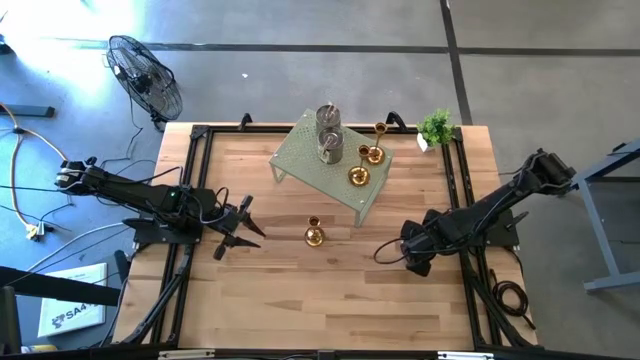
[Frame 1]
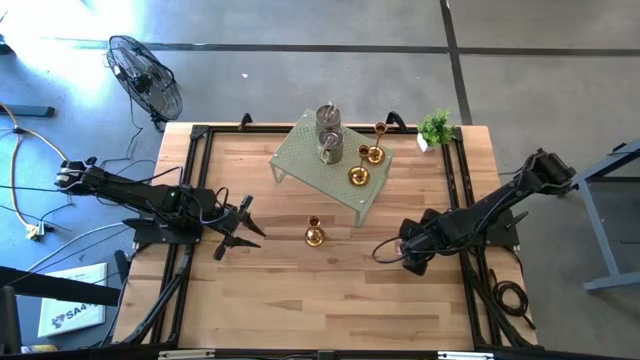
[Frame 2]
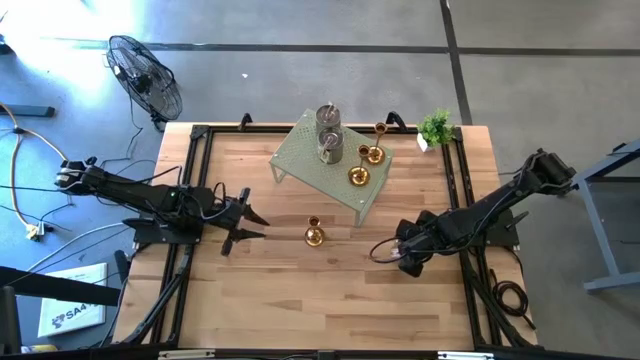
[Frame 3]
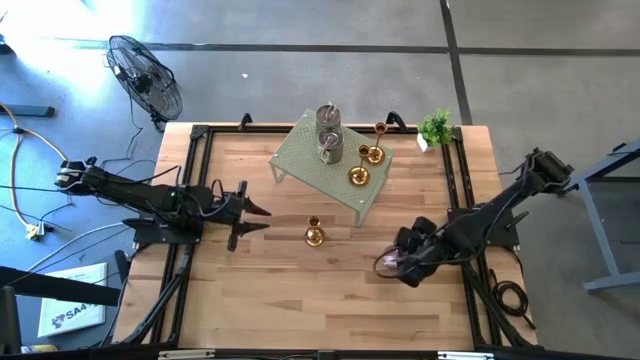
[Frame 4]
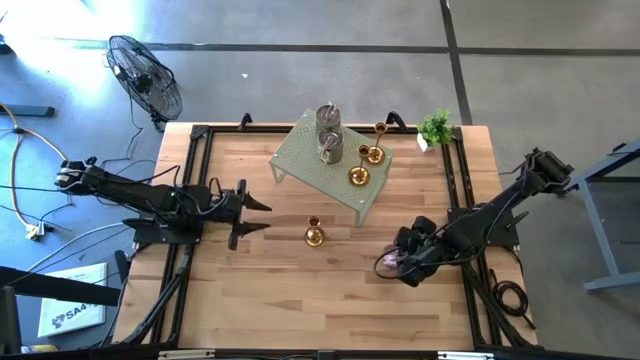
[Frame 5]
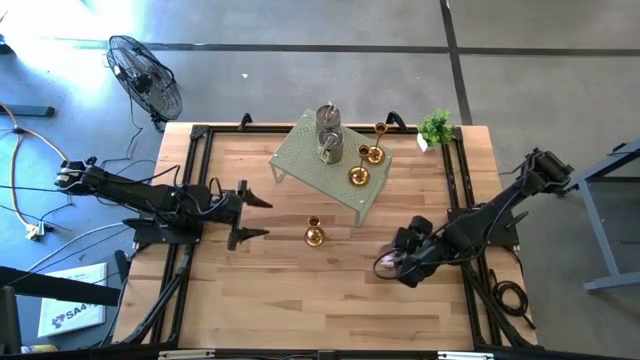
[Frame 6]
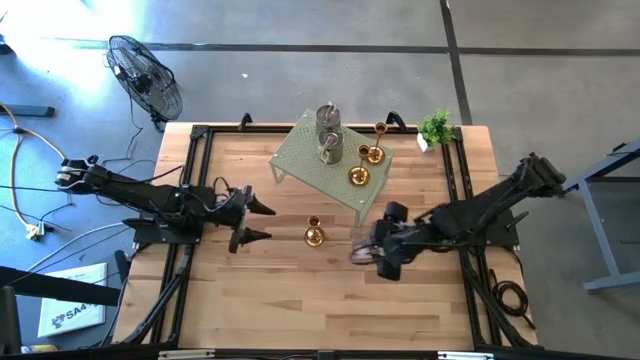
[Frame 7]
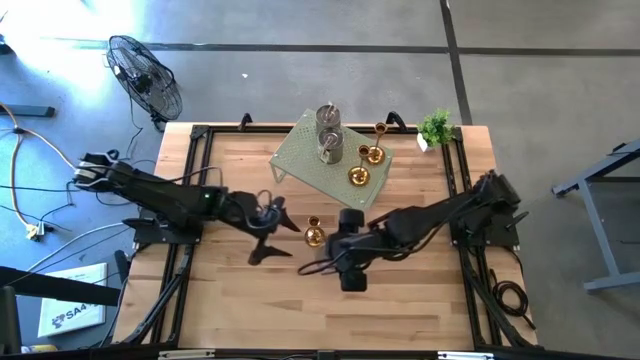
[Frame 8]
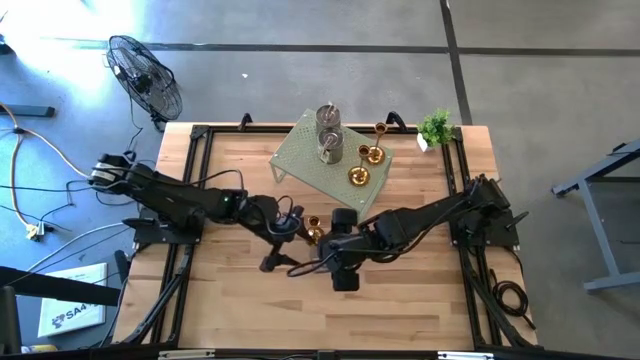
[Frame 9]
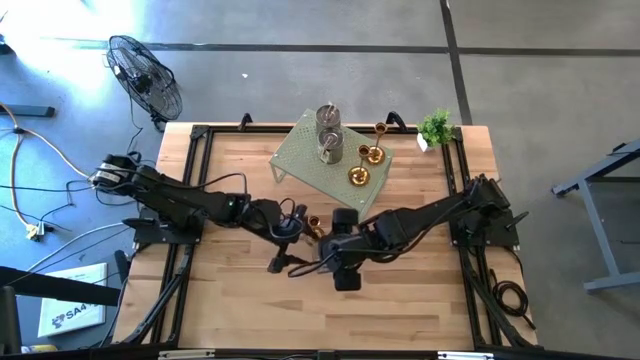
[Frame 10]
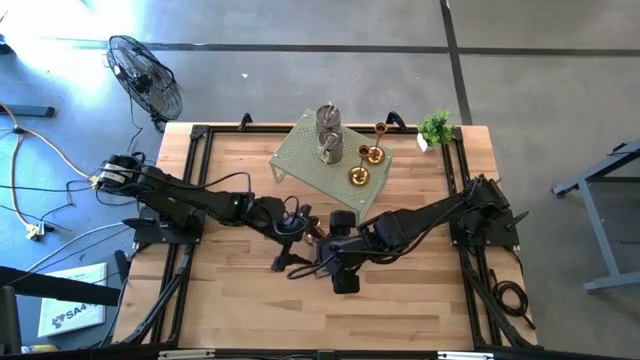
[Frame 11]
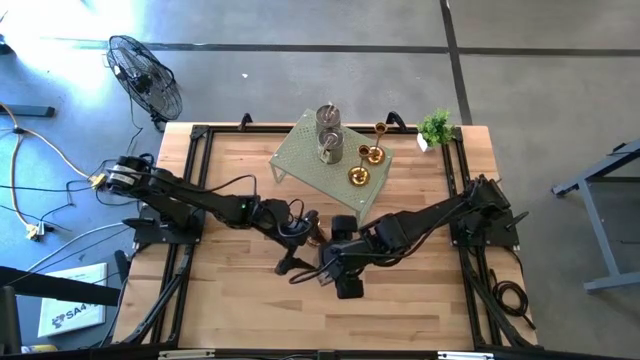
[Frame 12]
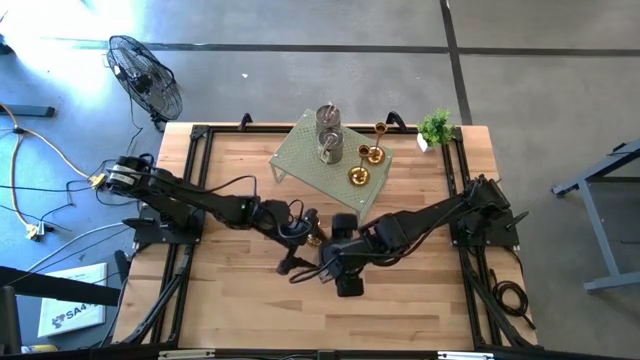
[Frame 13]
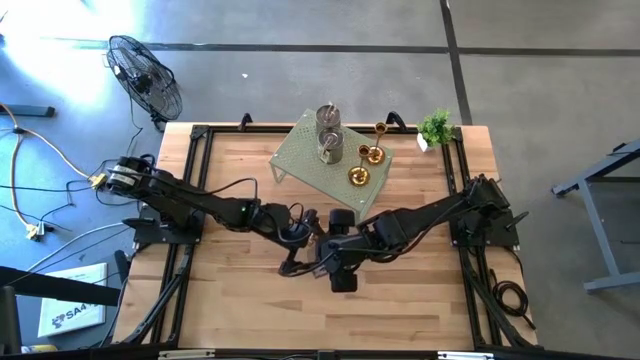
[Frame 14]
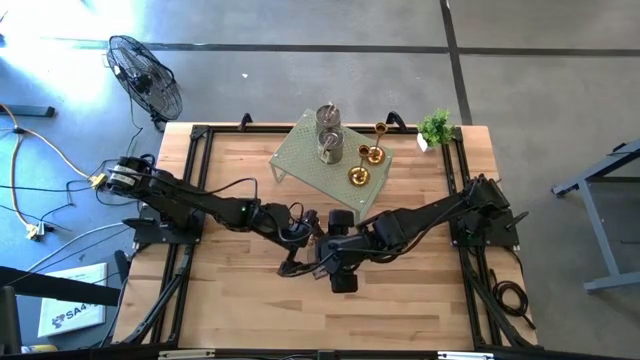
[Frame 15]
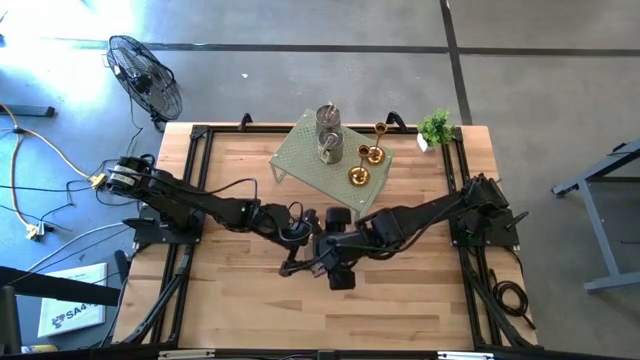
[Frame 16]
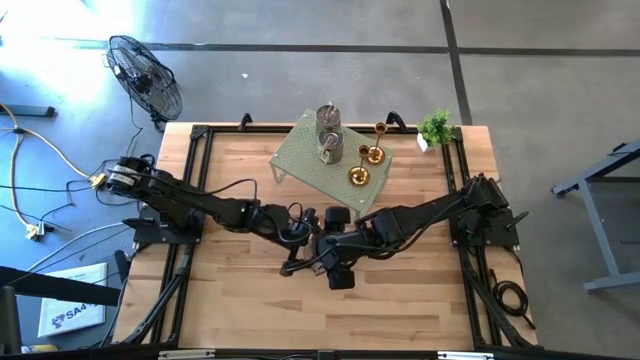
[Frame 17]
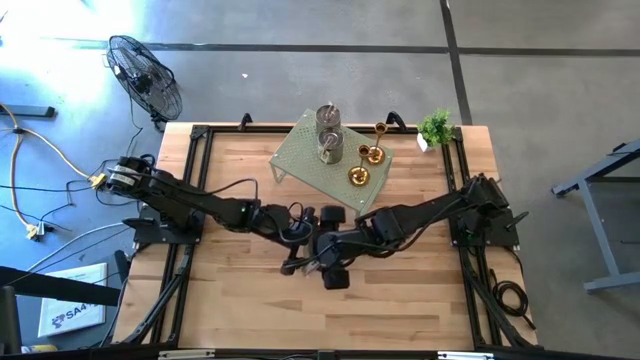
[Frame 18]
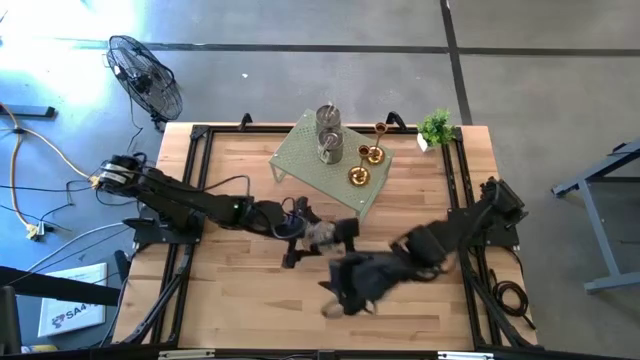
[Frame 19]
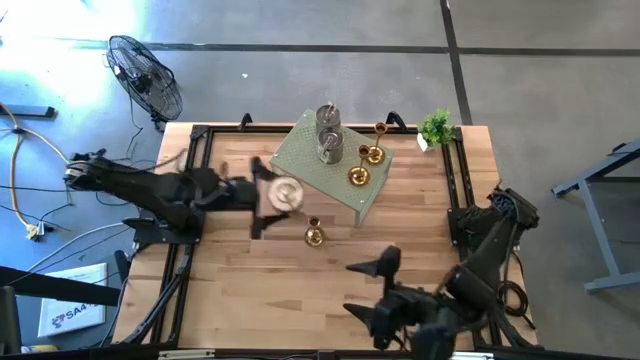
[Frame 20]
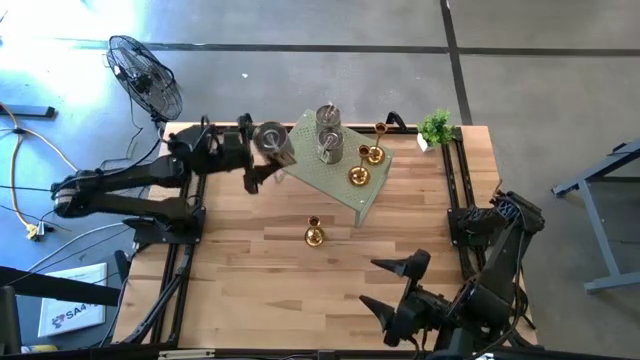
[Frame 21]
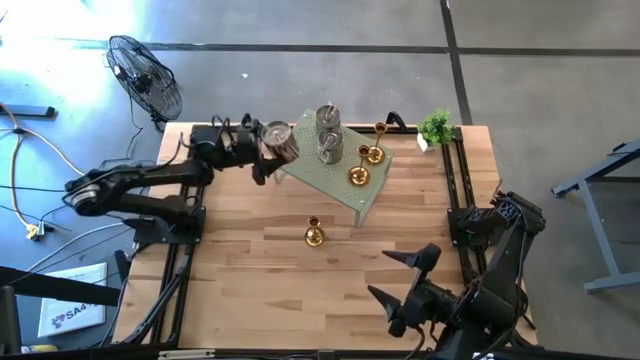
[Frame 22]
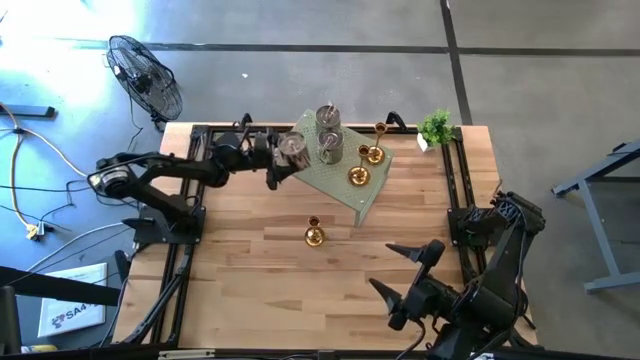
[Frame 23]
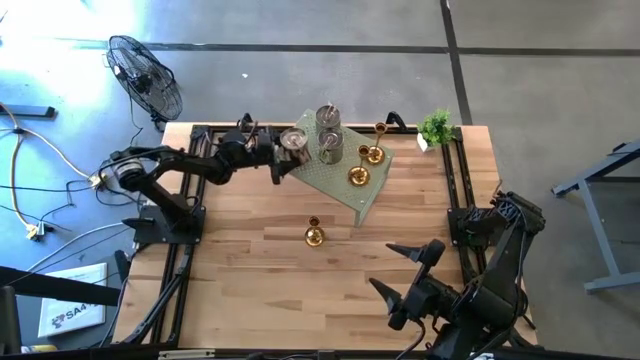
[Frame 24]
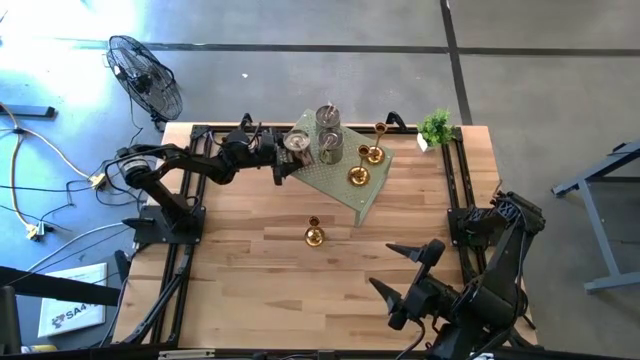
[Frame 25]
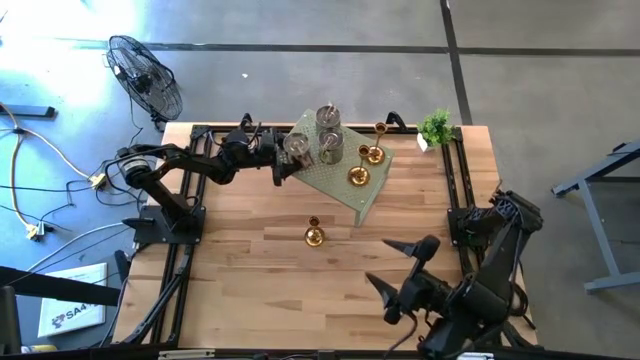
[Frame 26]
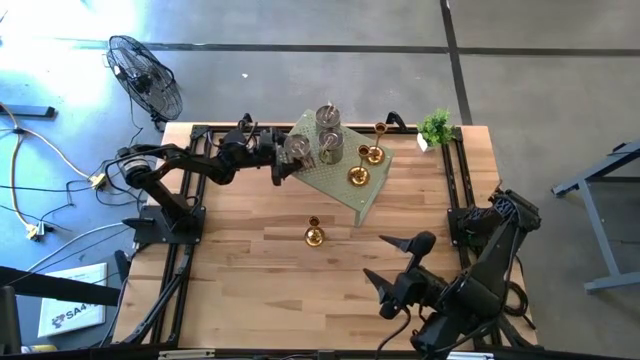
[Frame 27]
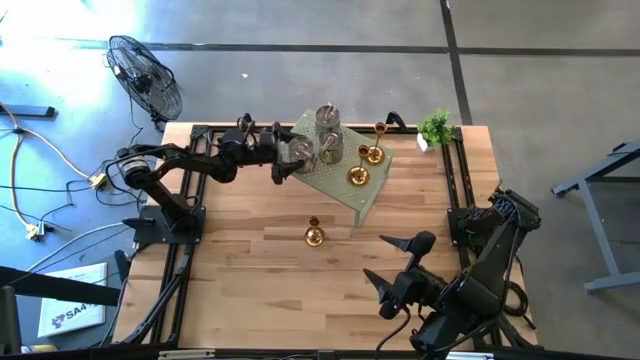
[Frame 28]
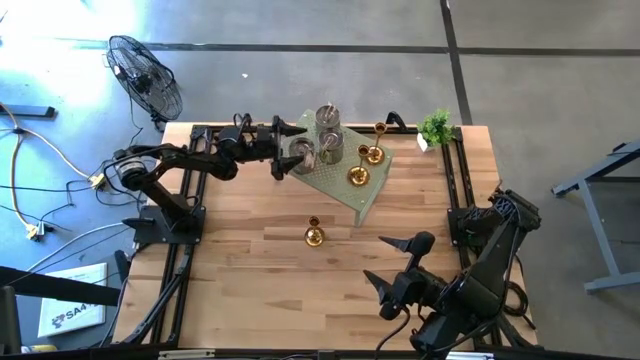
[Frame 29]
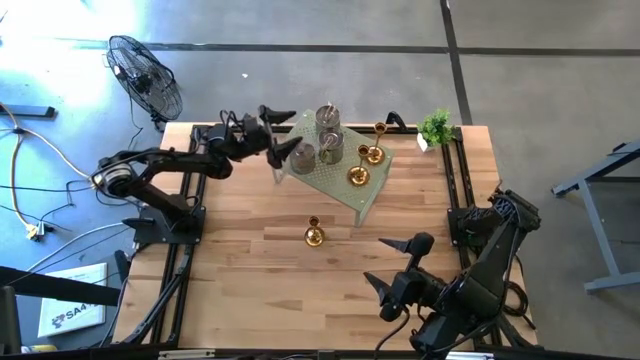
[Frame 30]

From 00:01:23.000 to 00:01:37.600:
Task: Pick & Place candle stick holders
Put the brown scented candle on the shelf

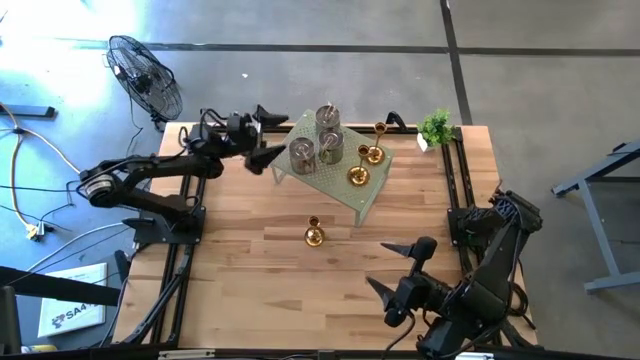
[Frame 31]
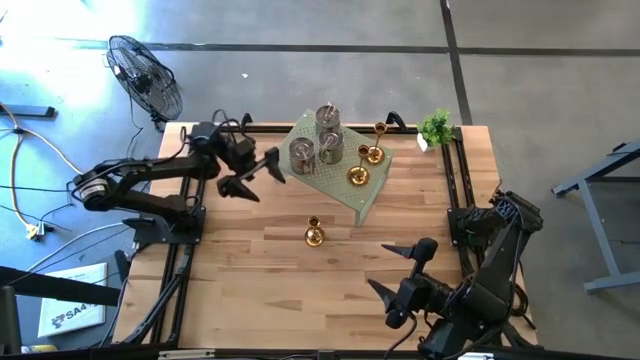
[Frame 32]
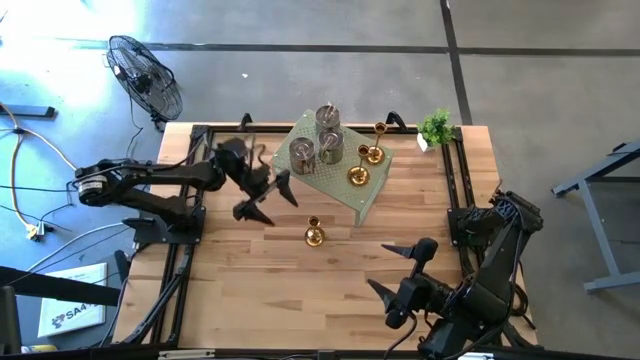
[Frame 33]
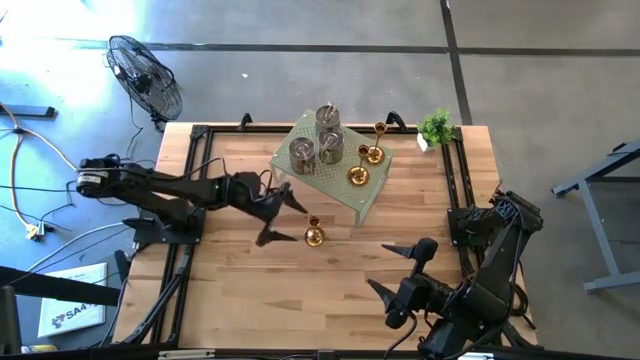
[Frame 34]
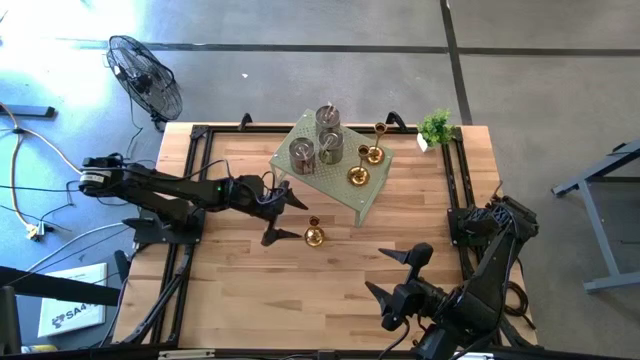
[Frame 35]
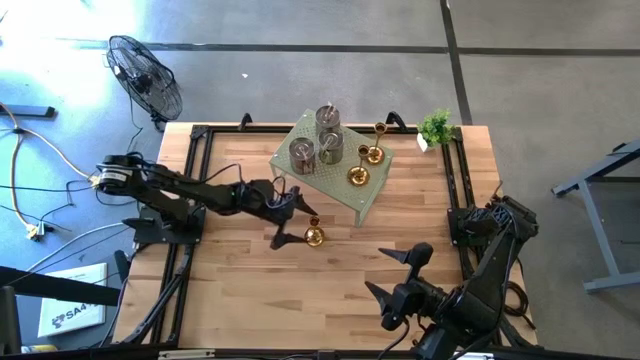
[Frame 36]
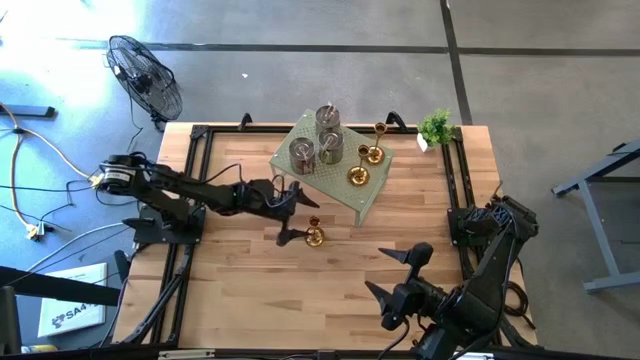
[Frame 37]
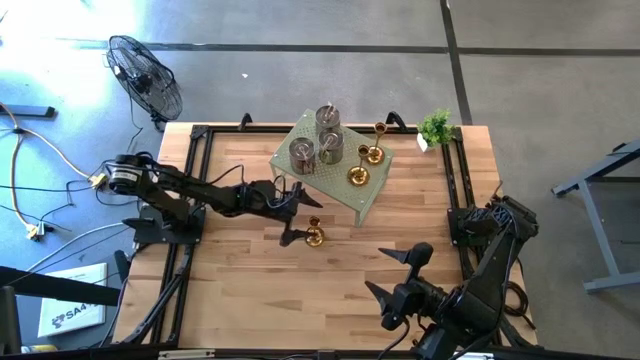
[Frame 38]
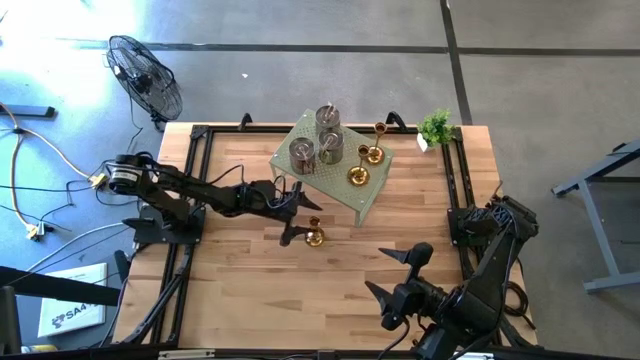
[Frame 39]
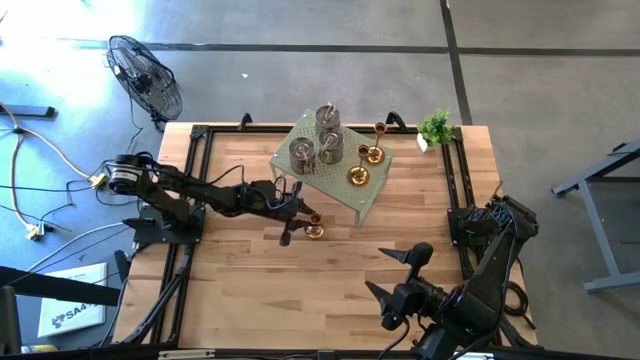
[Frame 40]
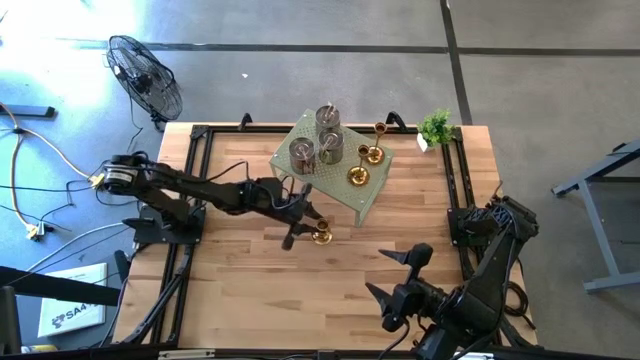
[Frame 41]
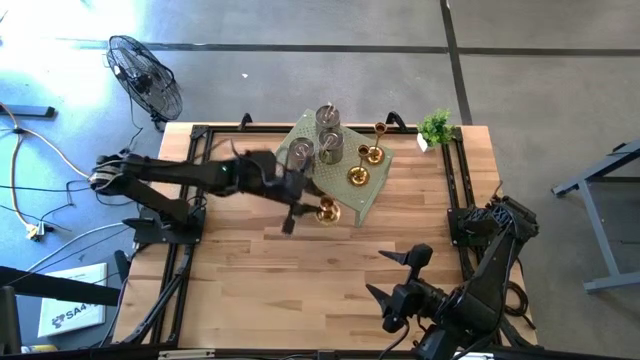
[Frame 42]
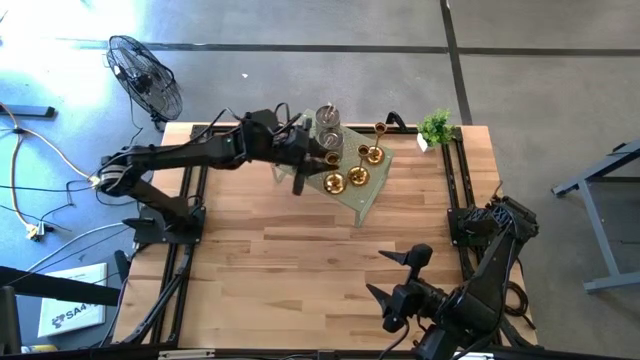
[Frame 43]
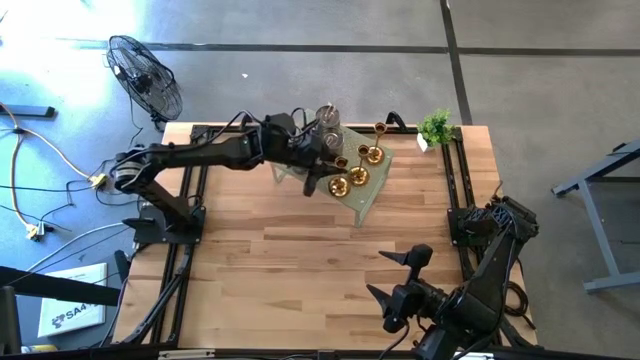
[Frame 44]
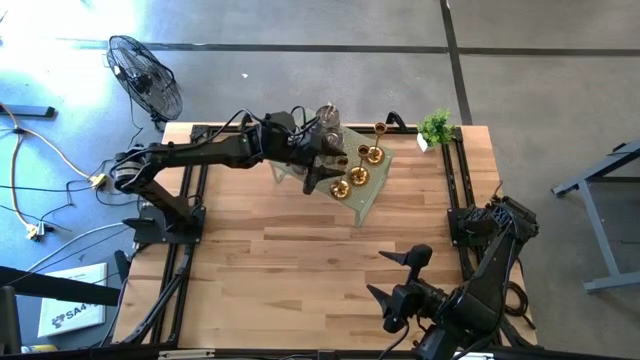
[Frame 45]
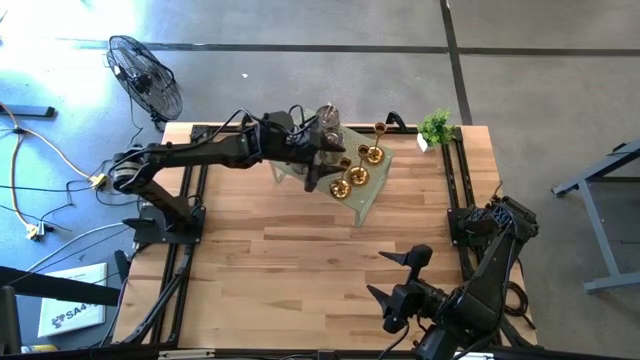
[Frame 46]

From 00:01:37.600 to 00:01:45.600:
Put the gold candle holder on the shelf
